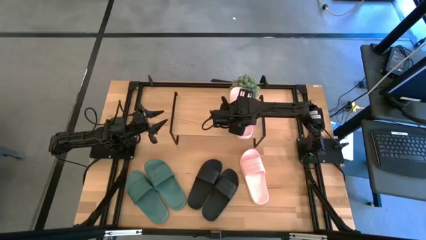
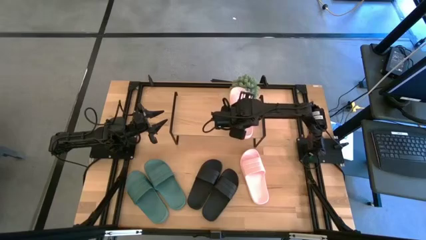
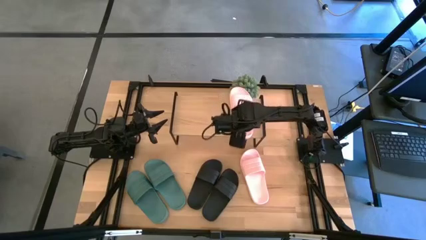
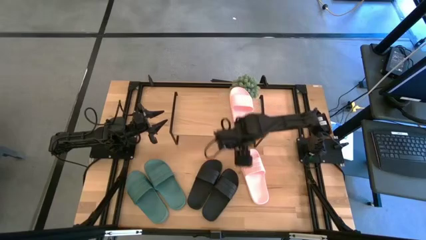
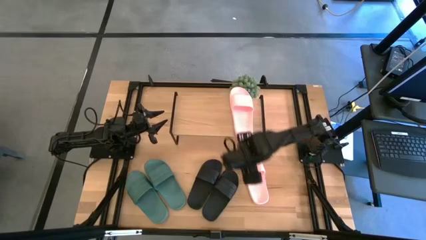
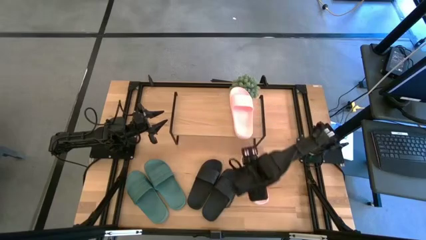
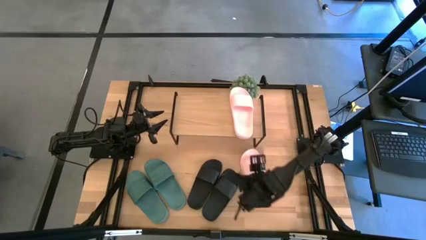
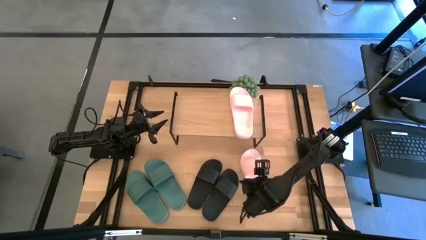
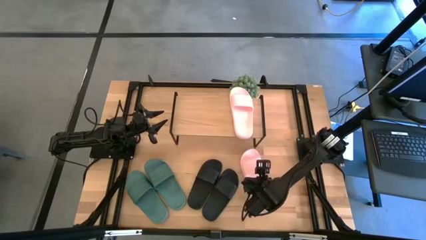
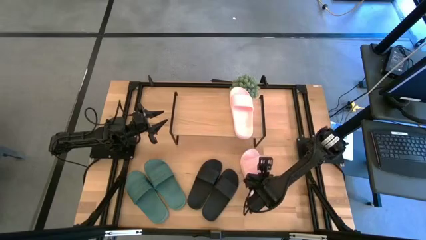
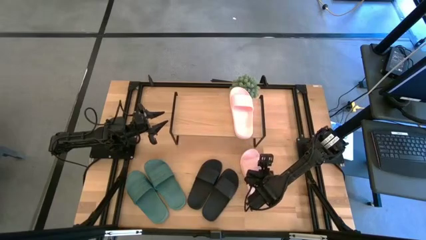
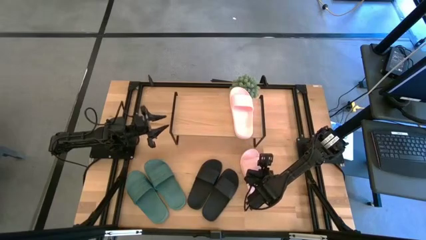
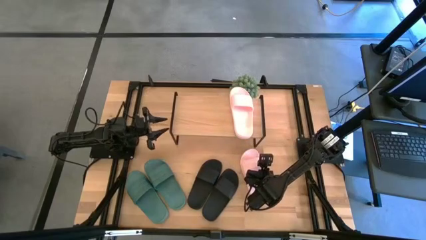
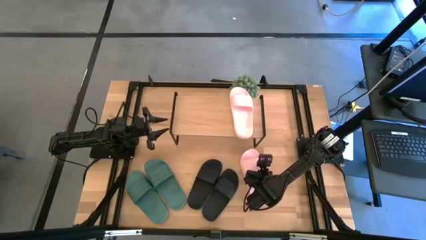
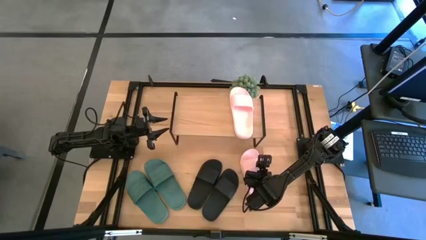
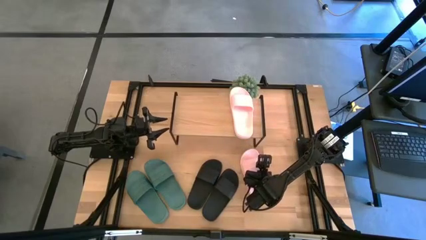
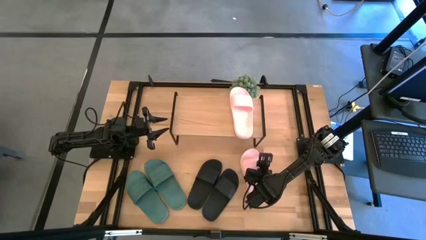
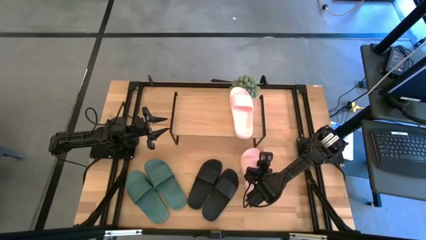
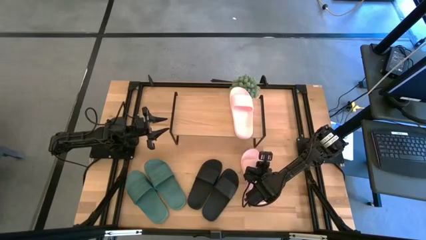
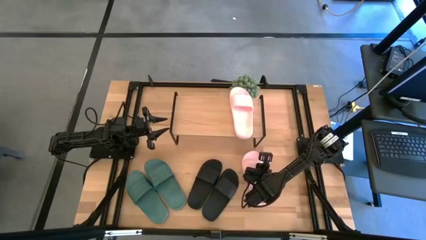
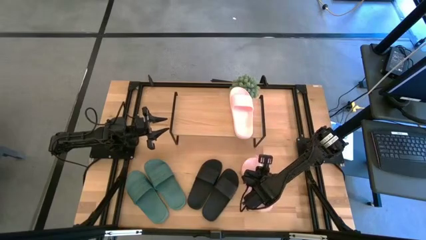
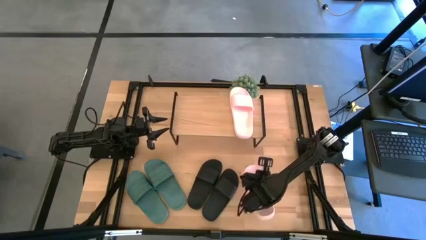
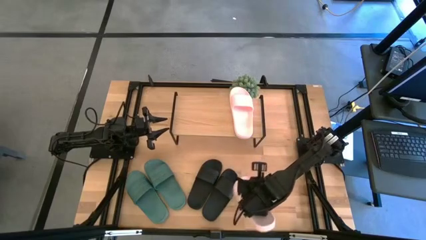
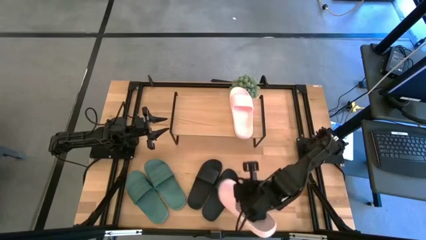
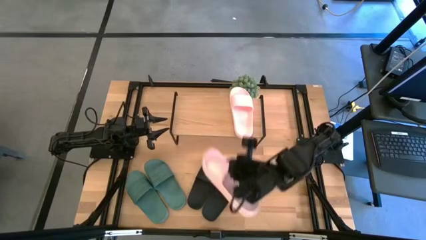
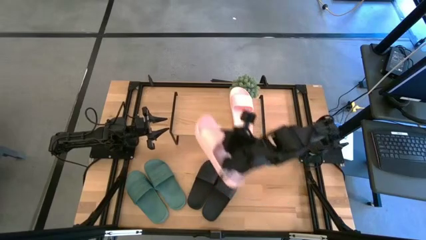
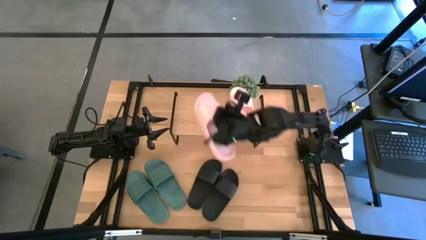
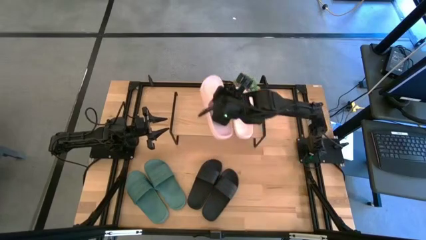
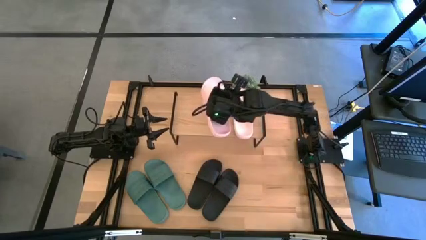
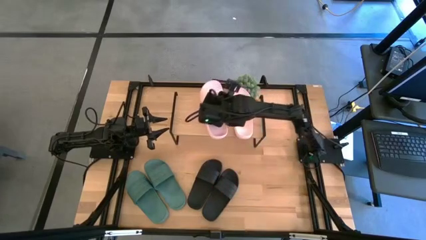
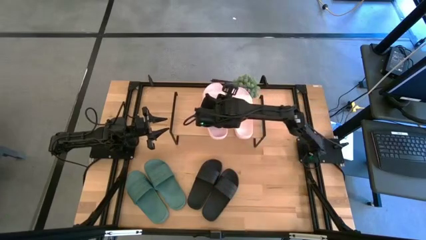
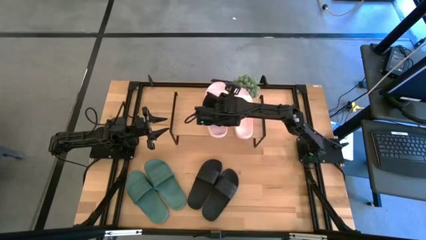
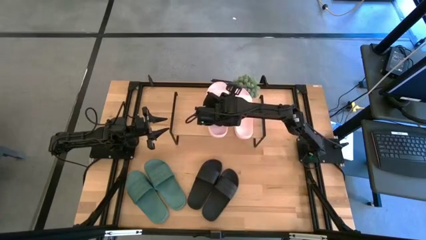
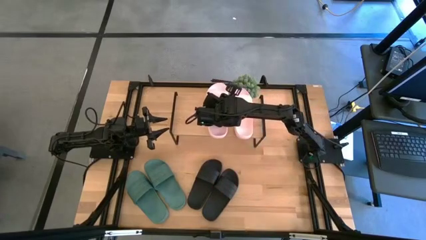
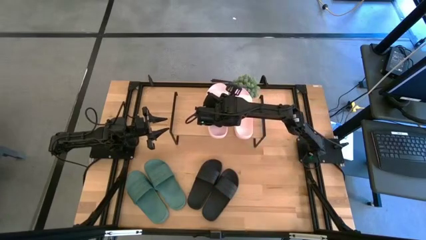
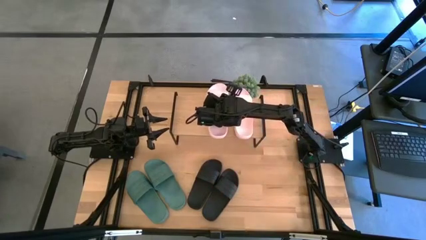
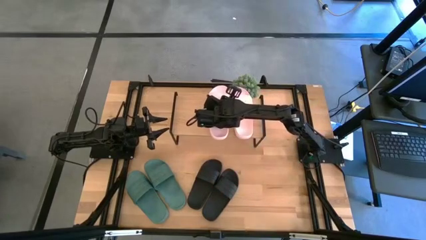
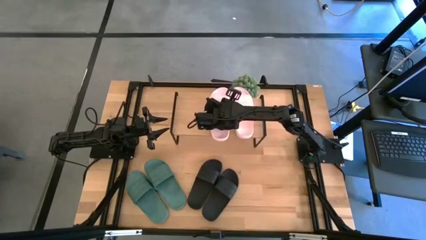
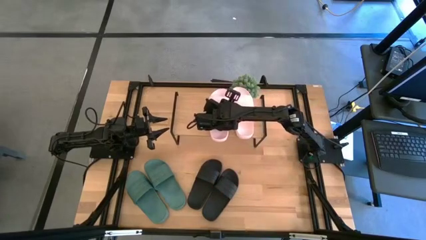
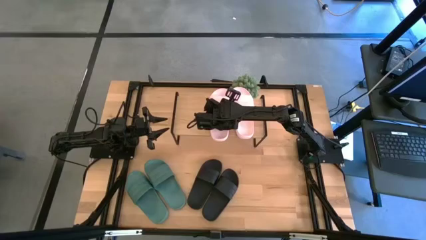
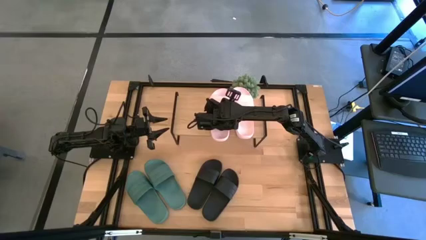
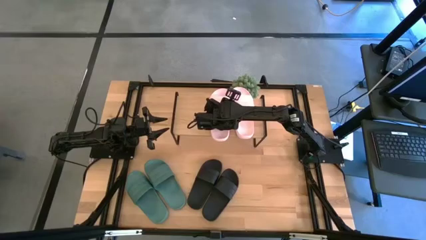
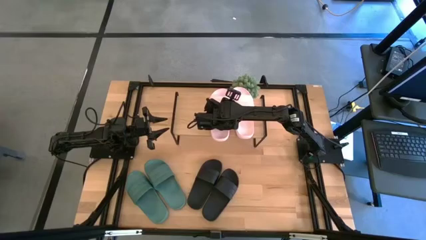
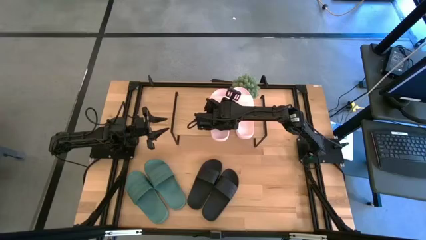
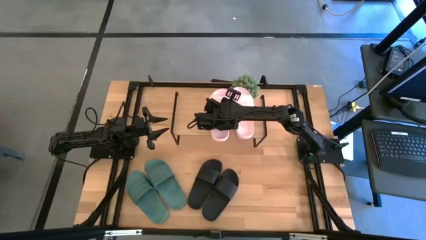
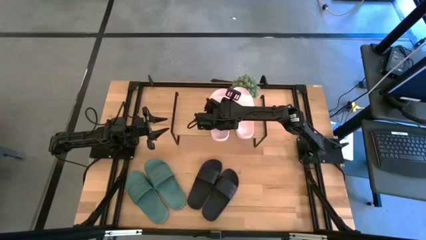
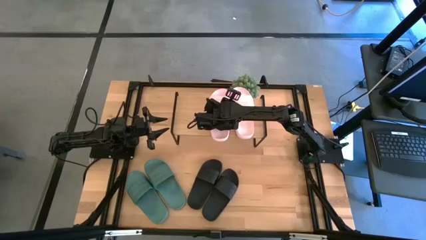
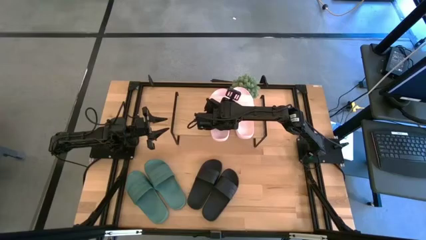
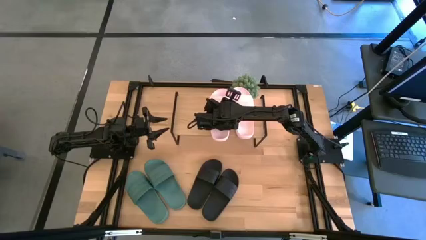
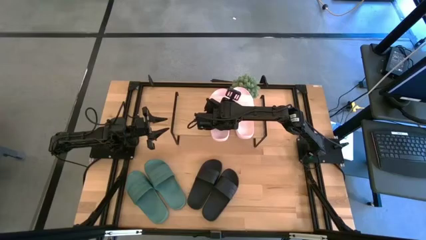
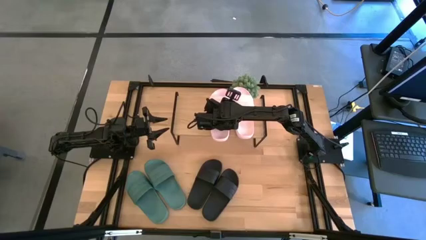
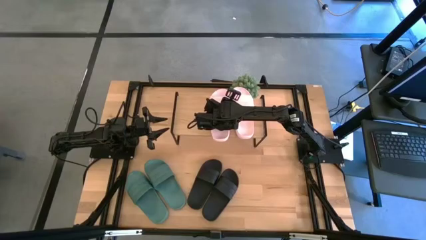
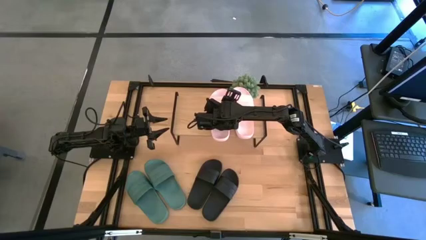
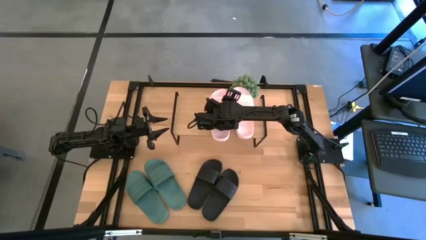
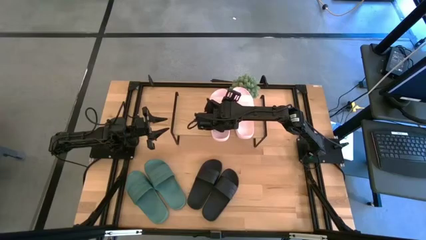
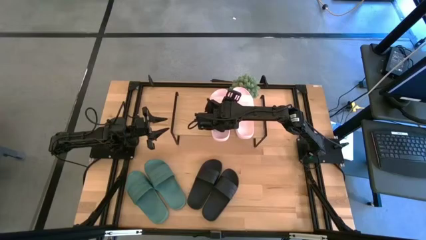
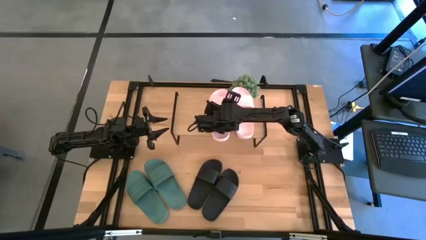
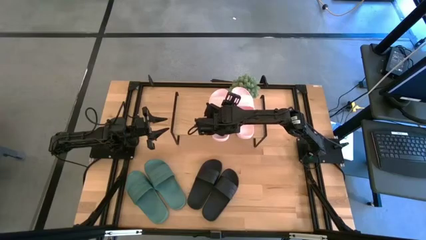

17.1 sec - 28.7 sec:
Task: Pick and place slides into the shelf
Put the pink slide on the shelf
